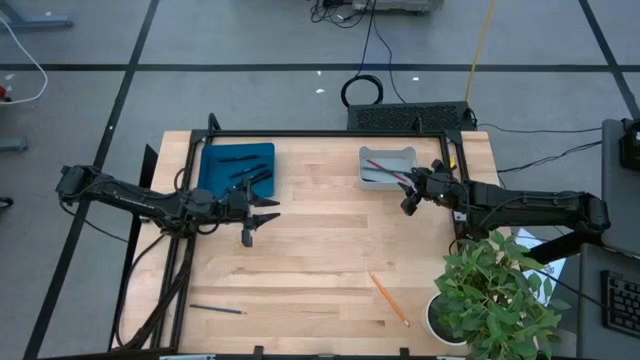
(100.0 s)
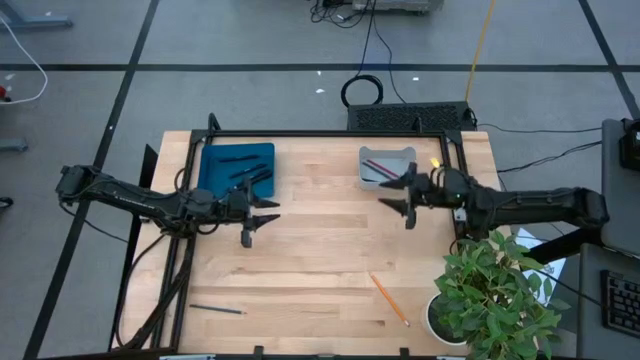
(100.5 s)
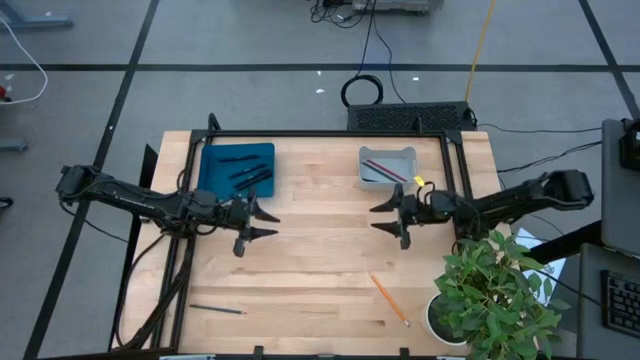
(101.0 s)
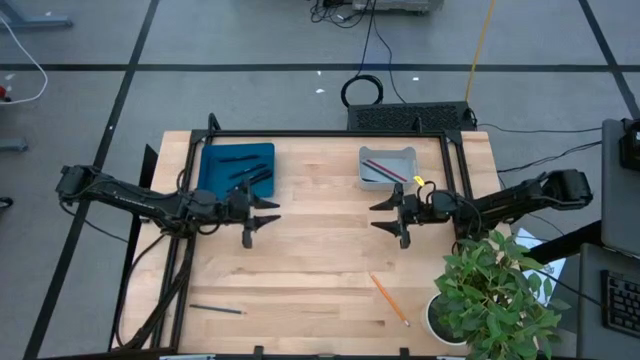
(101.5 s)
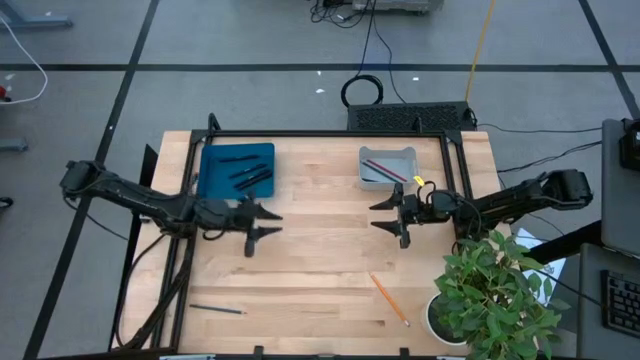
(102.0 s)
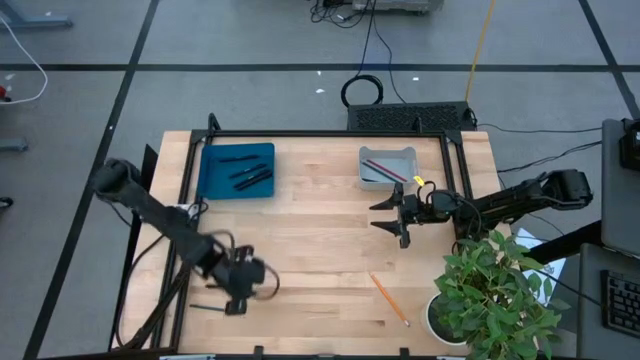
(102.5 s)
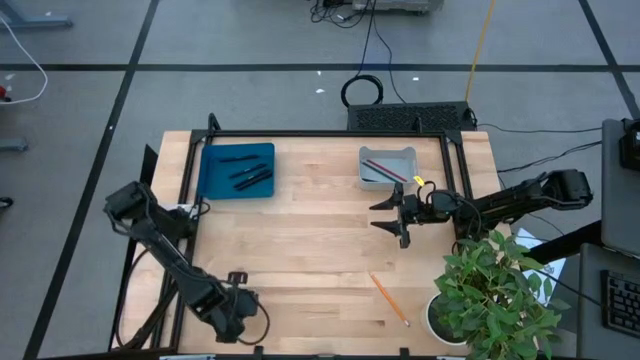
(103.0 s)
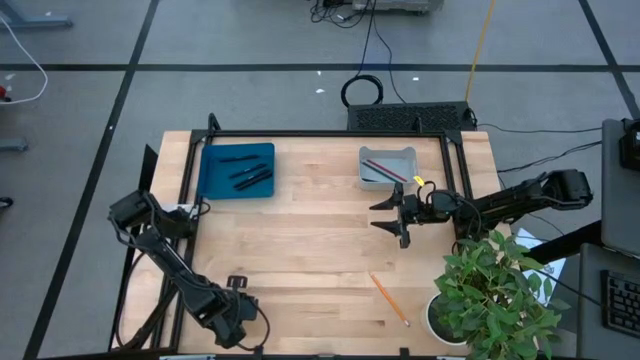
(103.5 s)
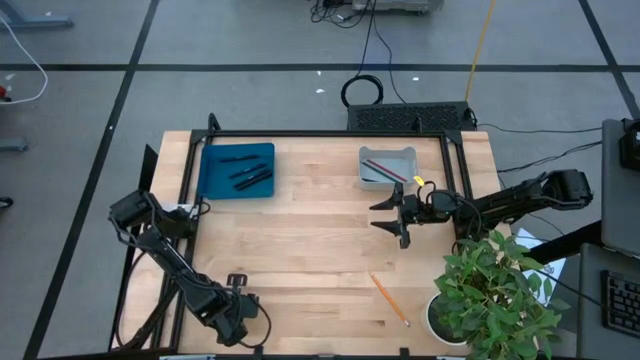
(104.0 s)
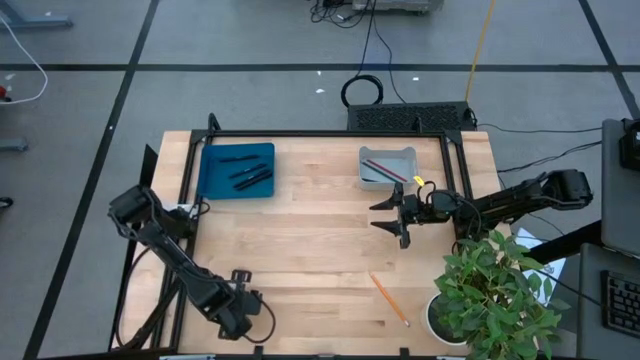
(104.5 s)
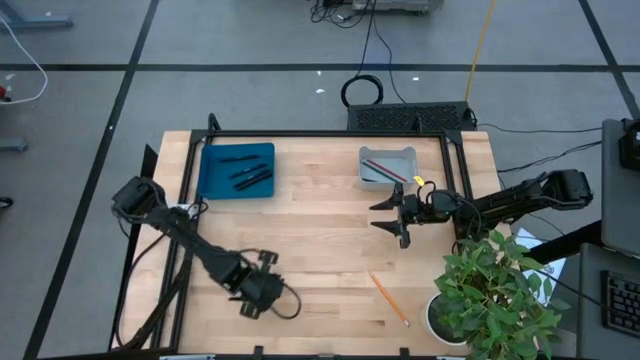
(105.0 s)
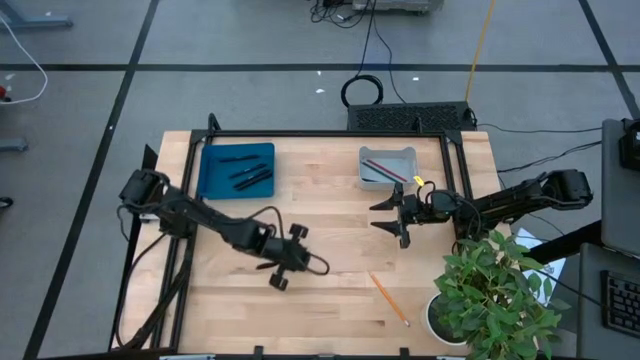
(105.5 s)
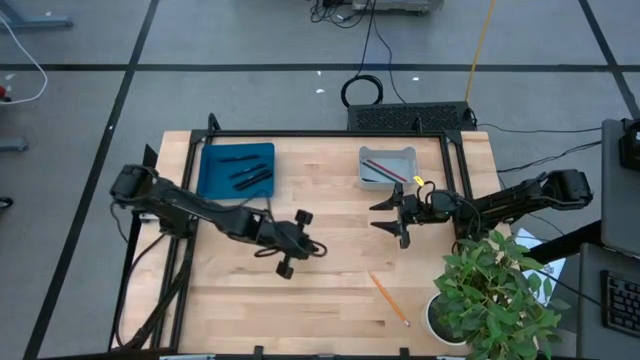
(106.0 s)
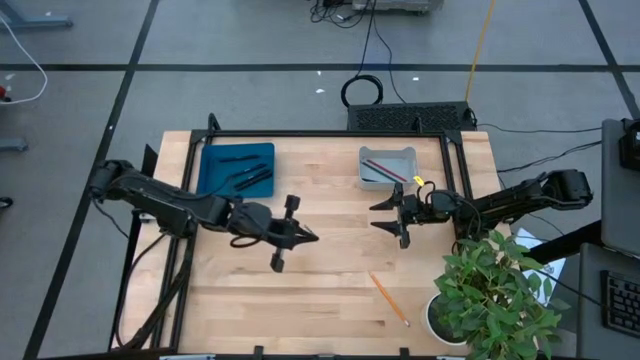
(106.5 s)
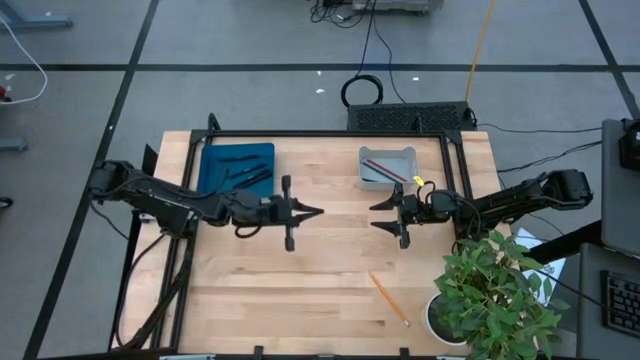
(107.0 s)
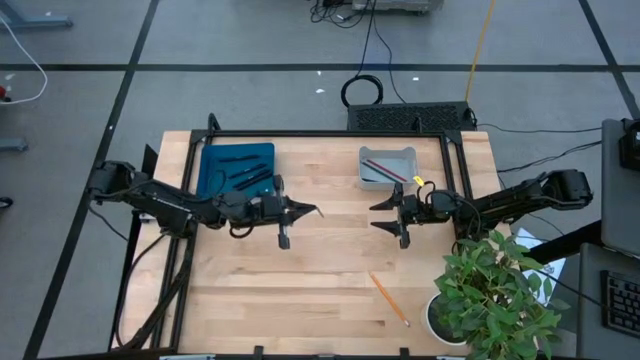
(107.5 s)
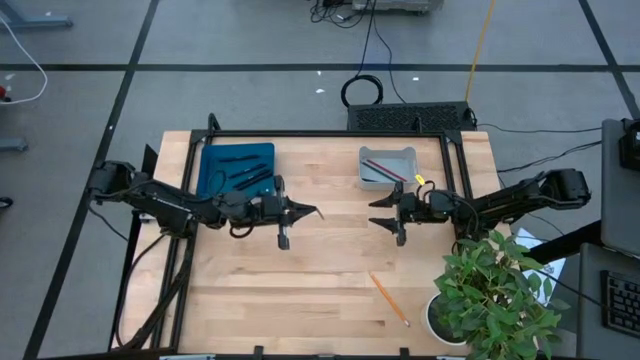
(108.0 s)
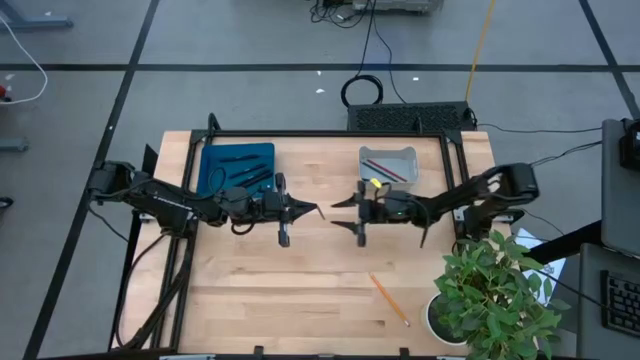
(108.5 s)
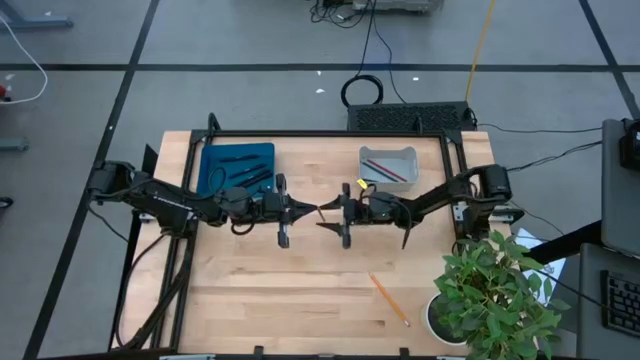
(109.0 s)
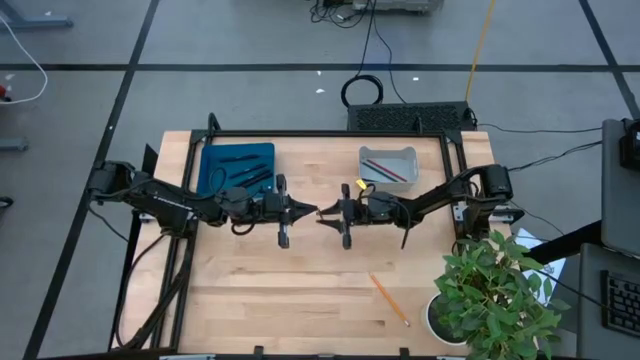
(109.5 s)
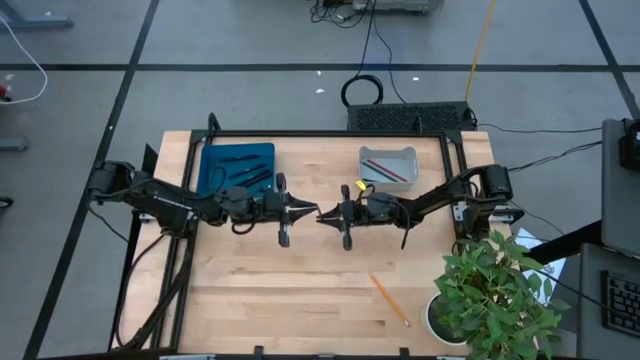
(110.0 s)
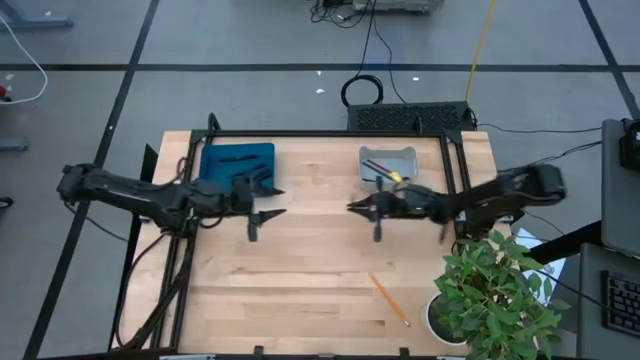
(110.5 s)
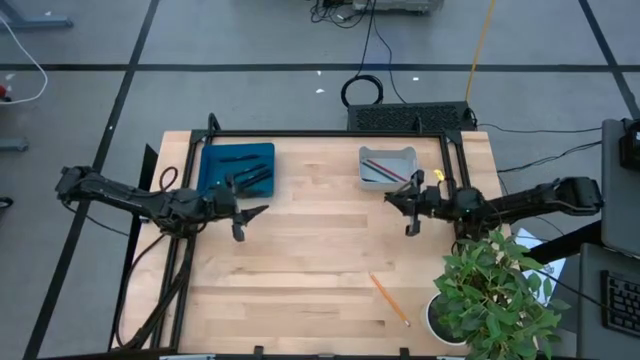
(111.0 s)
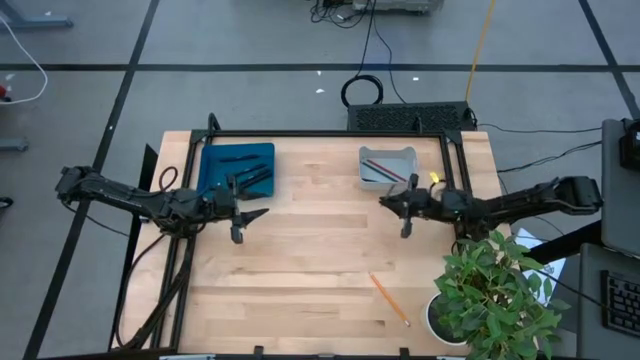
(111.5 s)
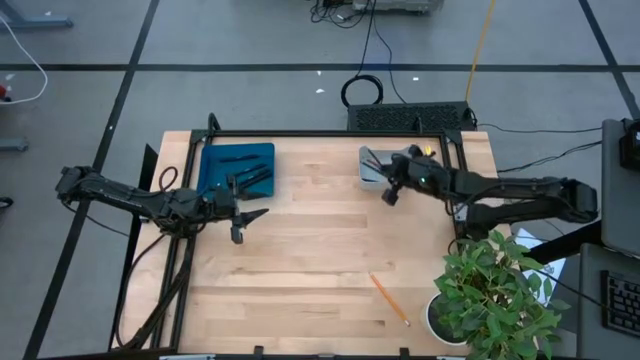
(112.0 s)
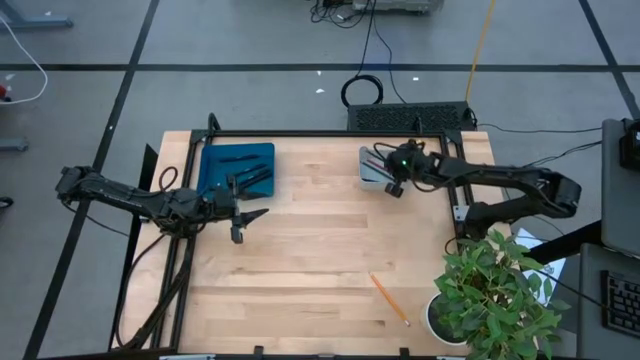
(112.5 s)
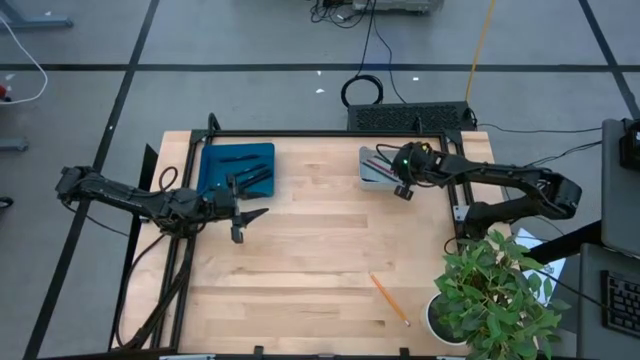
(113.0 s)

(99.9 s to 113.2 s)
Task: Sort pens & pencils
Put the green pencil into the gray bin

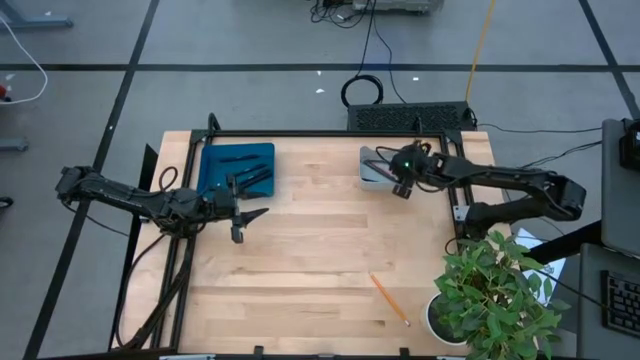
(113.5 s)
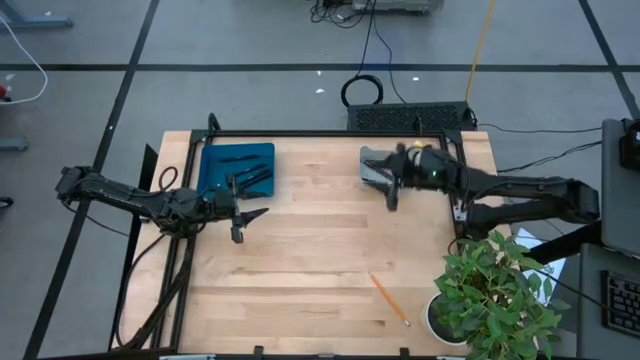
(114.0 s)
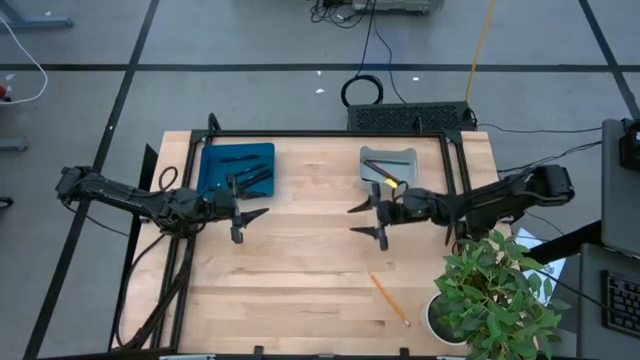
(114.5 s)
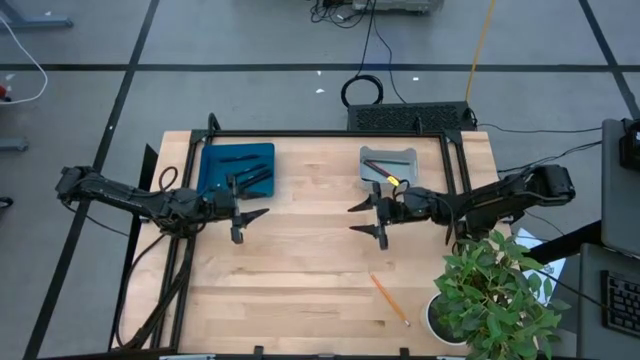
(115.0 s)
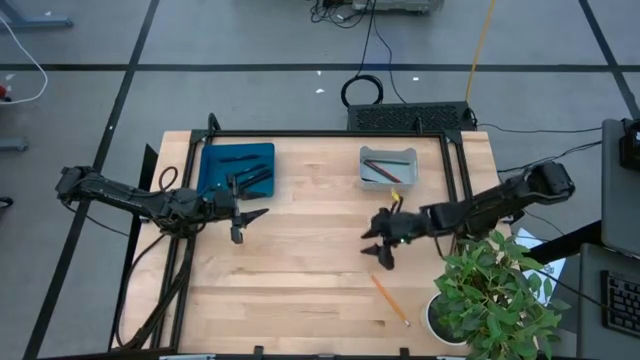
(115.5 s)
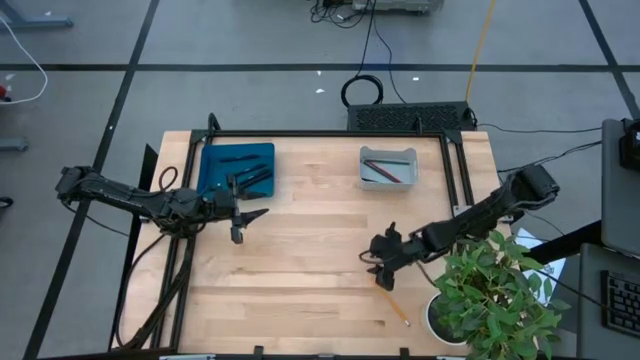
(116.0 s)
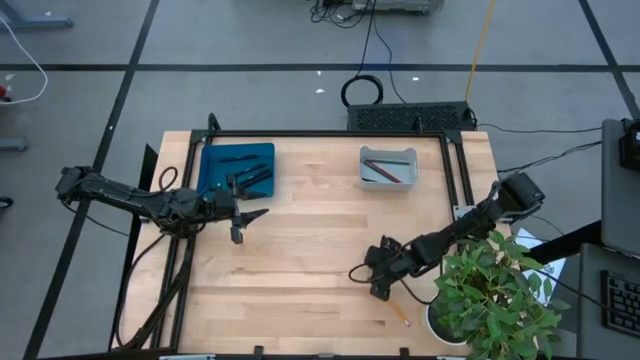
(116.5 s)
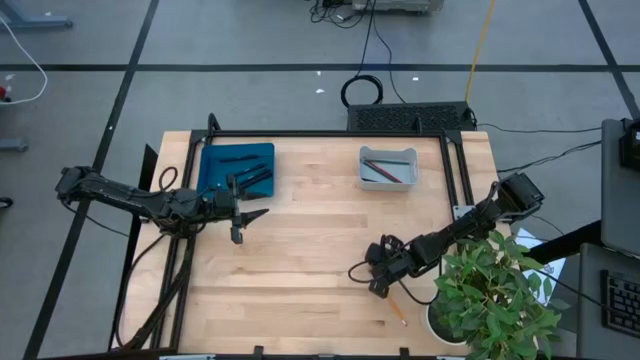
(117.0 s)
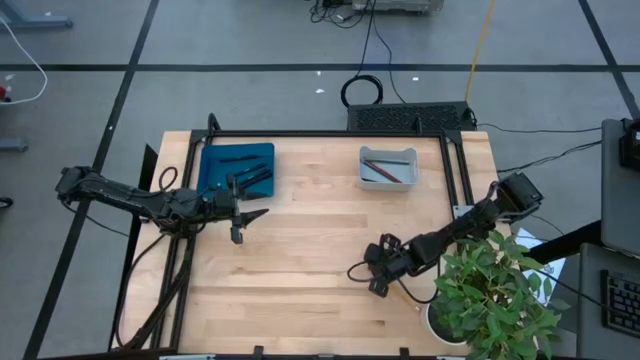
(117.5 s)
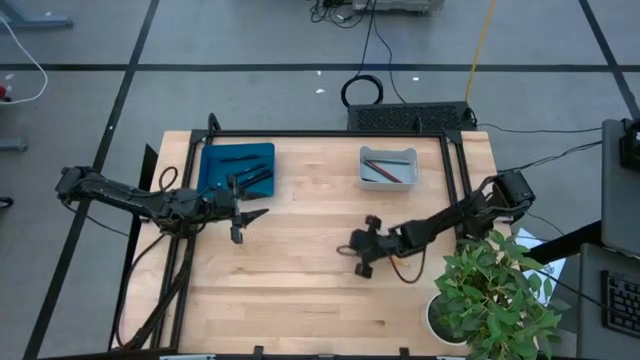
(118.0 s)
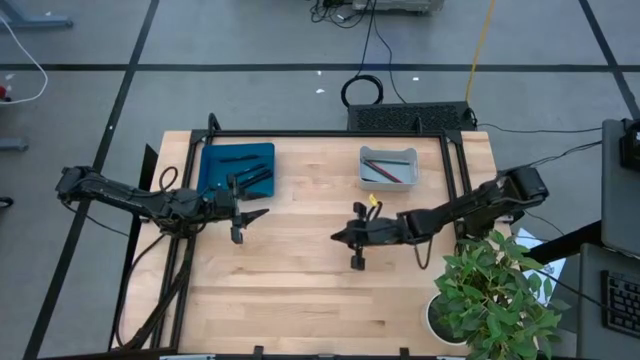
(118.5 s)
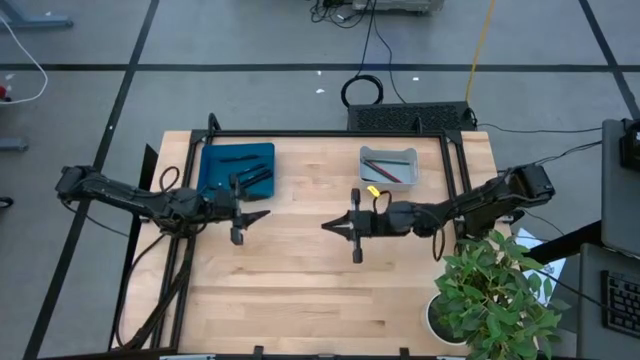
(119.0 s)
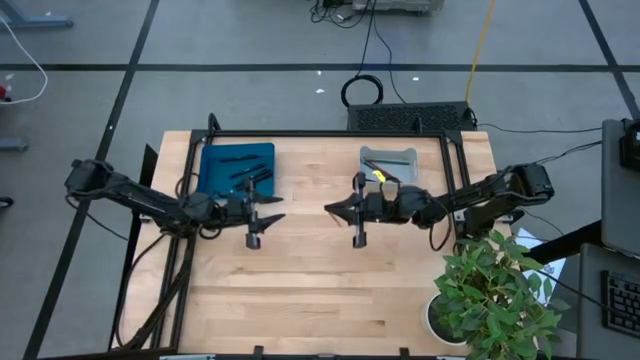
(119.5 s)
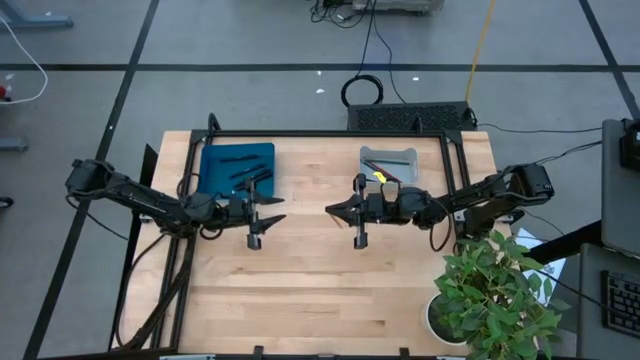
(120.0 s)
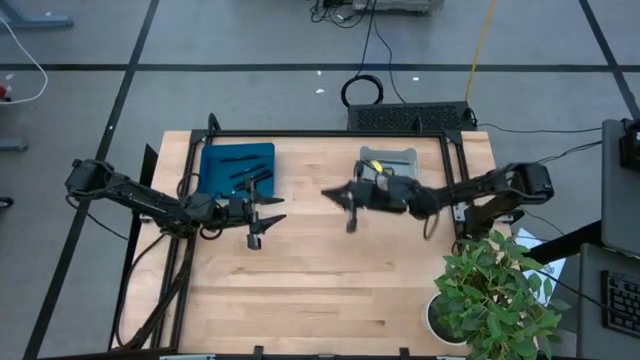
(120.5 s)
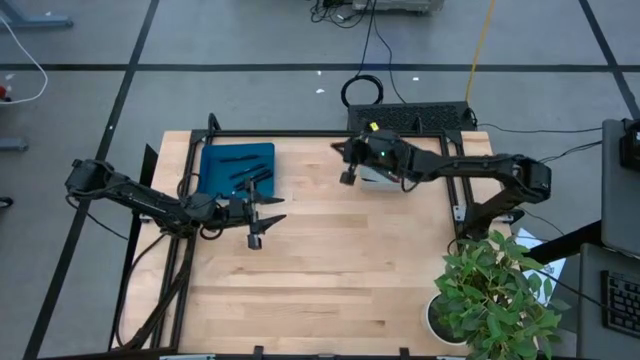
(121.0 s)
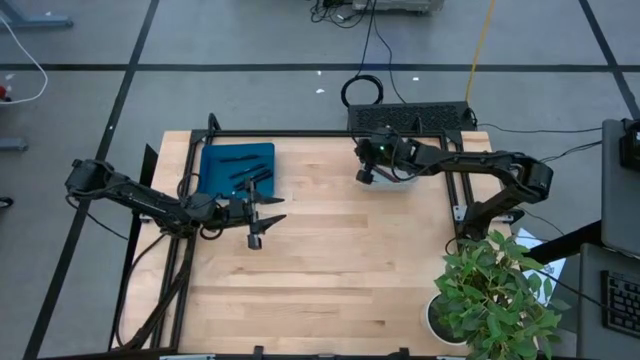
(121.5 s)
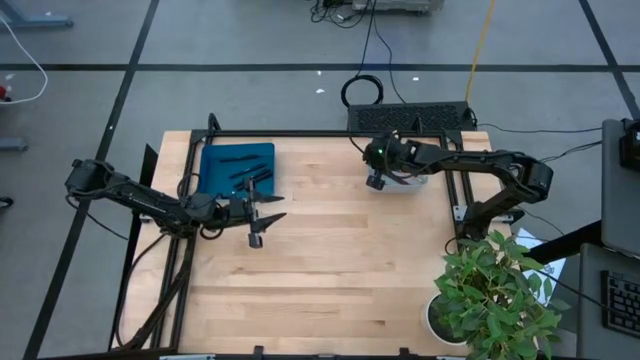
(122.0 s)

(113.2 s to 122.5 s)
Put the yellow pencil into the gray bin

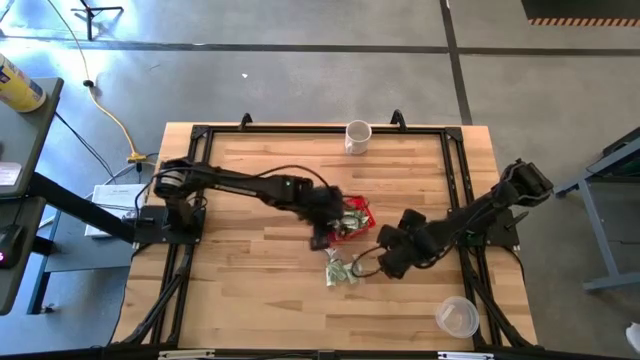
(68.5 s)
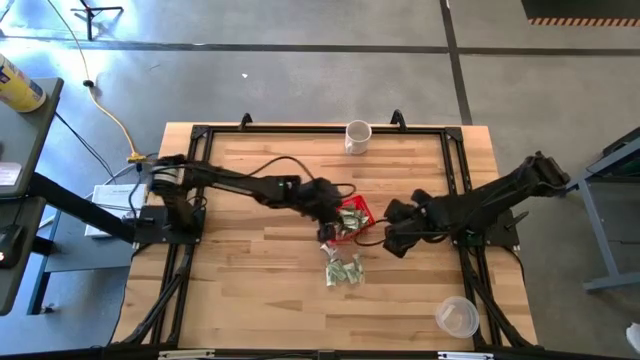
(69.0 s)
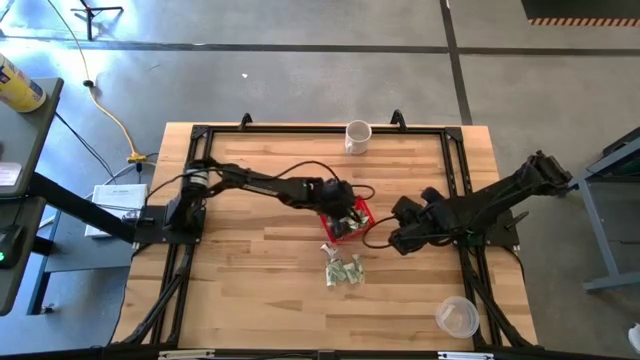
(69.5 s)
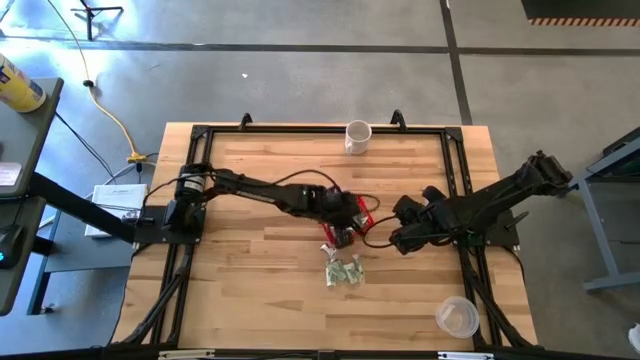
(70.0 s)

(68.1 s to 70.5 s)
Task: Pick and place items into bin
Adjust the white stevia packet in the red bin
